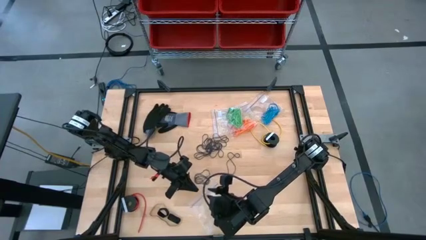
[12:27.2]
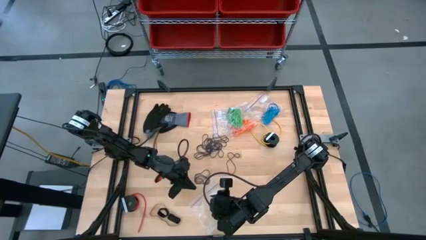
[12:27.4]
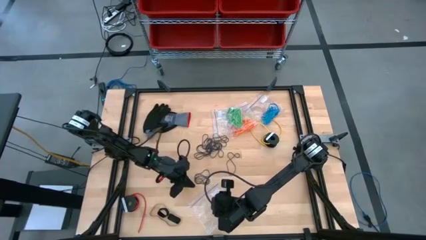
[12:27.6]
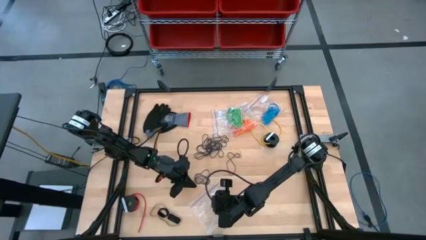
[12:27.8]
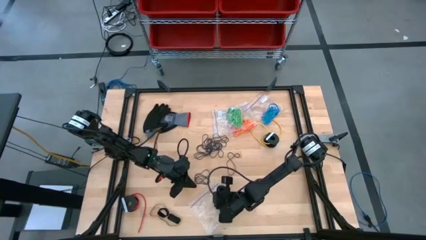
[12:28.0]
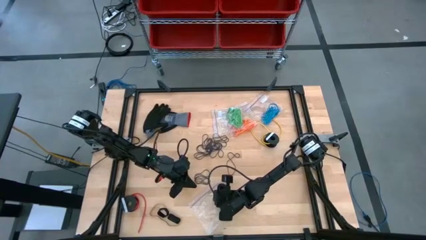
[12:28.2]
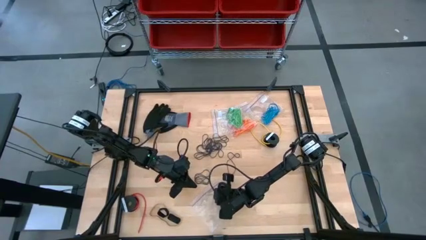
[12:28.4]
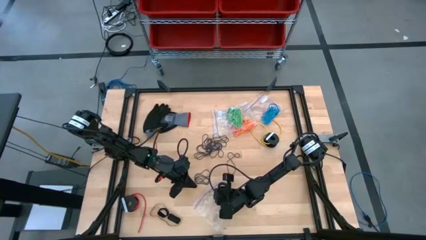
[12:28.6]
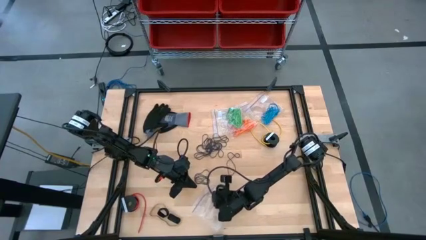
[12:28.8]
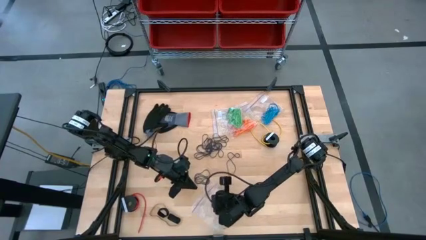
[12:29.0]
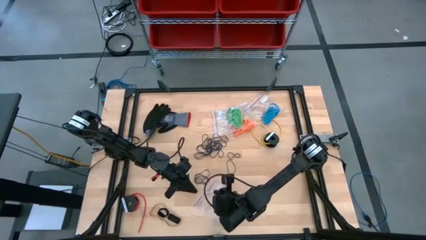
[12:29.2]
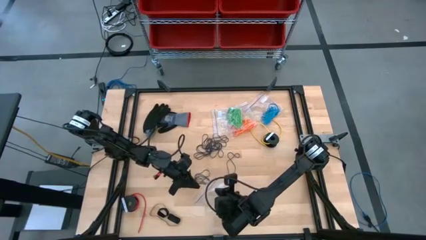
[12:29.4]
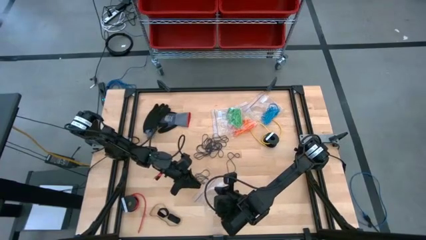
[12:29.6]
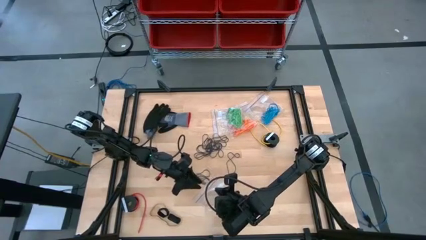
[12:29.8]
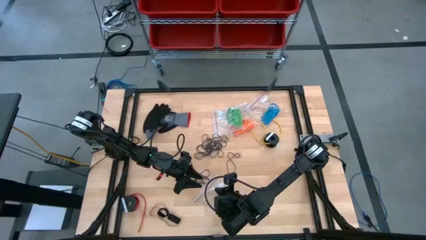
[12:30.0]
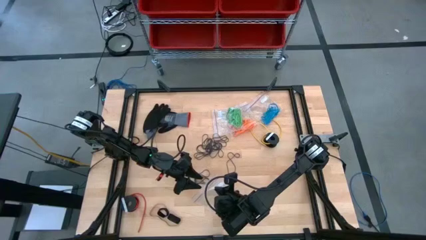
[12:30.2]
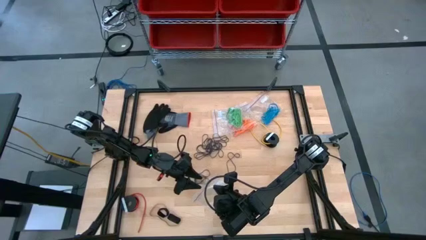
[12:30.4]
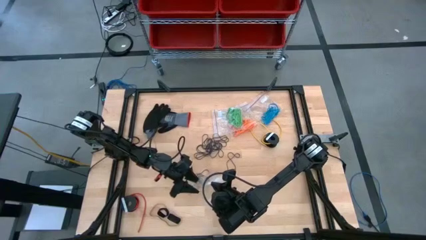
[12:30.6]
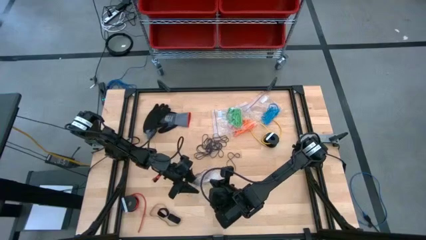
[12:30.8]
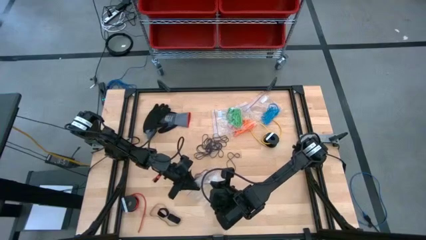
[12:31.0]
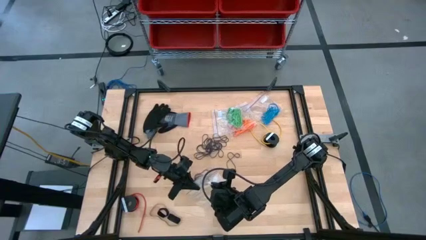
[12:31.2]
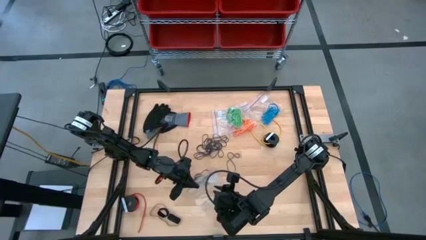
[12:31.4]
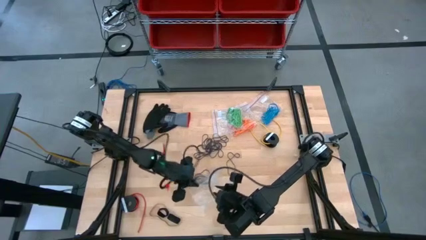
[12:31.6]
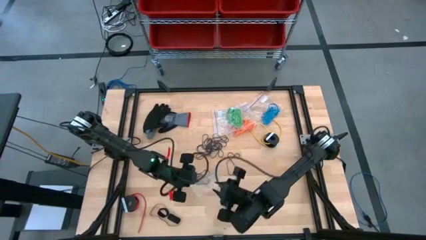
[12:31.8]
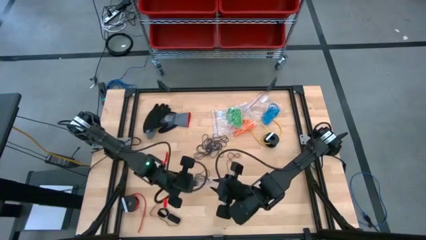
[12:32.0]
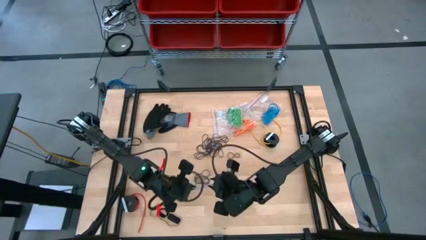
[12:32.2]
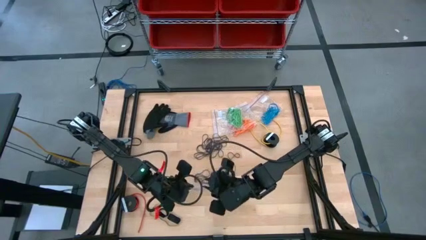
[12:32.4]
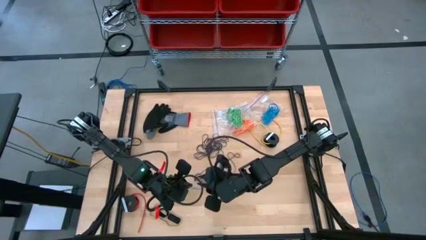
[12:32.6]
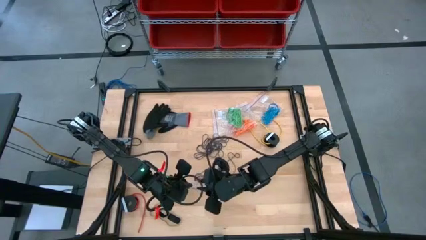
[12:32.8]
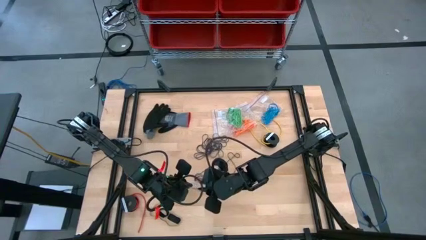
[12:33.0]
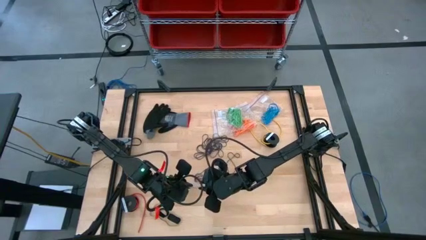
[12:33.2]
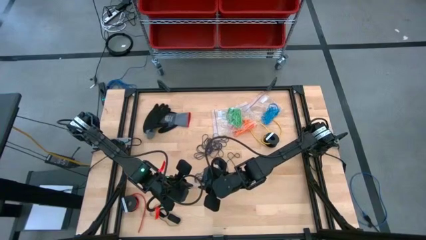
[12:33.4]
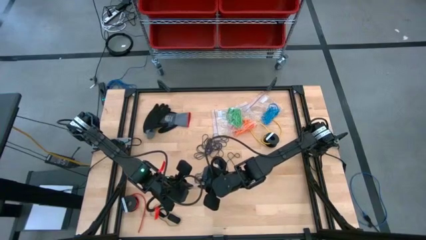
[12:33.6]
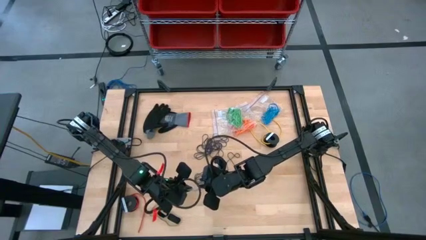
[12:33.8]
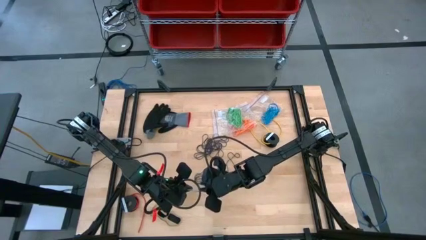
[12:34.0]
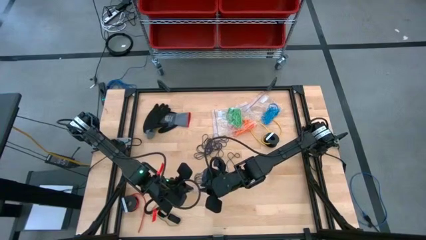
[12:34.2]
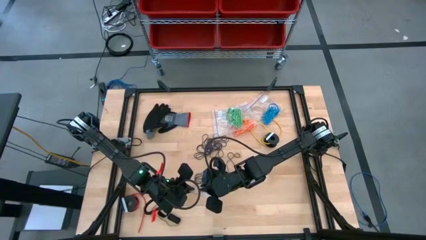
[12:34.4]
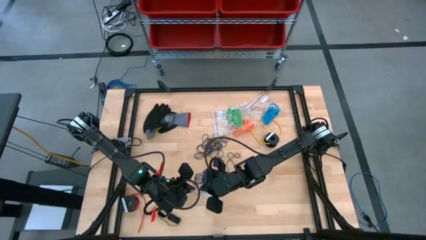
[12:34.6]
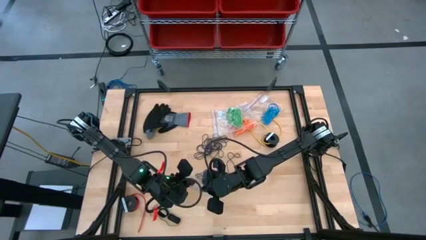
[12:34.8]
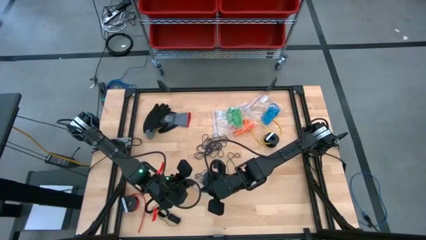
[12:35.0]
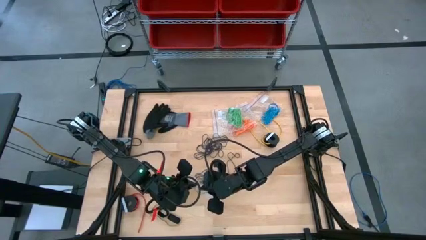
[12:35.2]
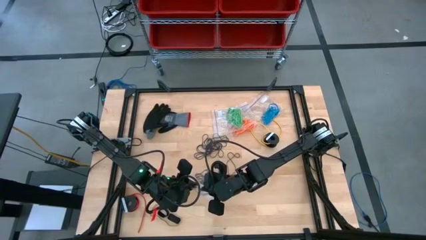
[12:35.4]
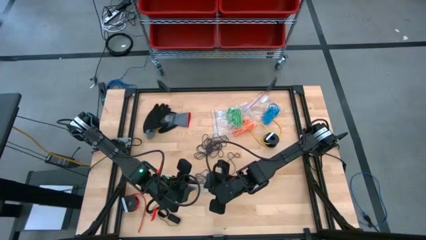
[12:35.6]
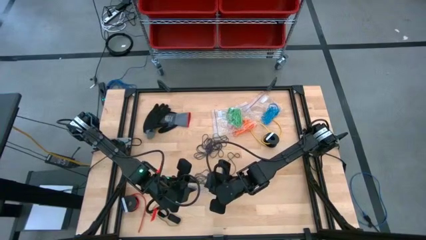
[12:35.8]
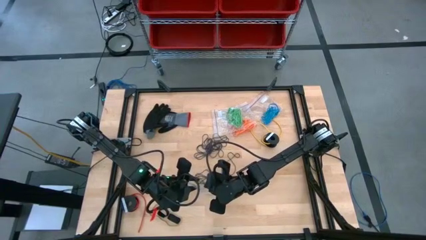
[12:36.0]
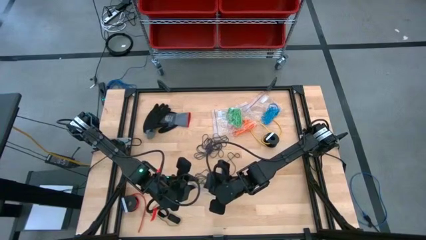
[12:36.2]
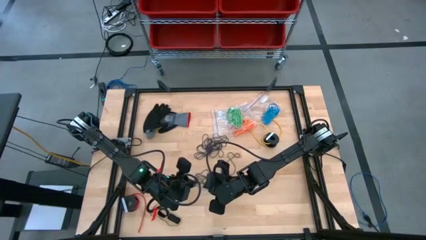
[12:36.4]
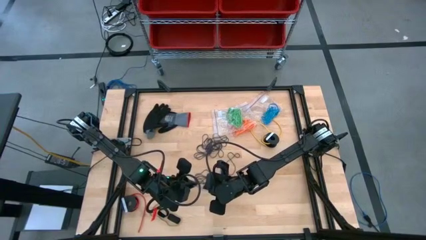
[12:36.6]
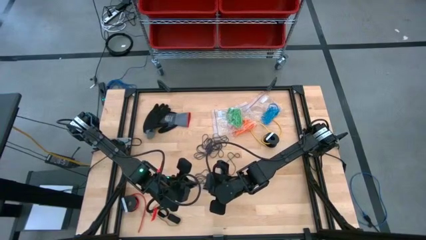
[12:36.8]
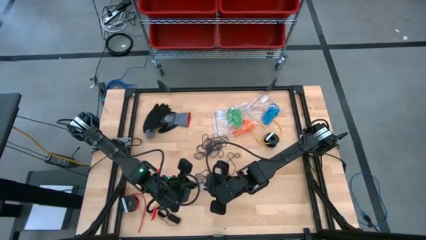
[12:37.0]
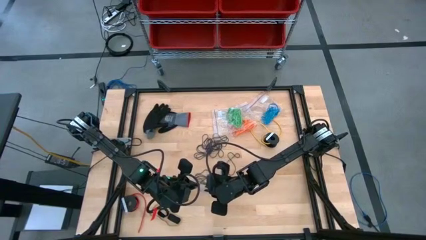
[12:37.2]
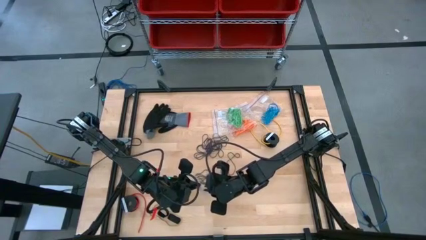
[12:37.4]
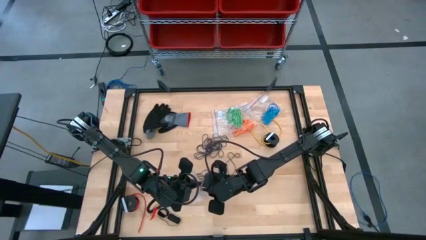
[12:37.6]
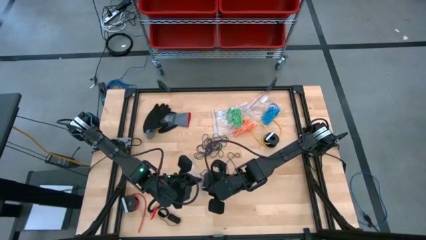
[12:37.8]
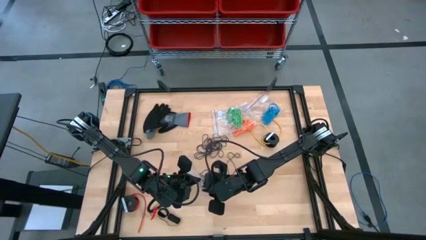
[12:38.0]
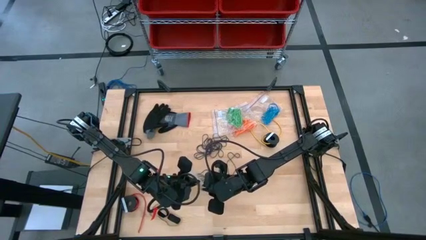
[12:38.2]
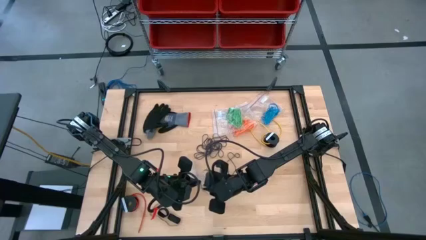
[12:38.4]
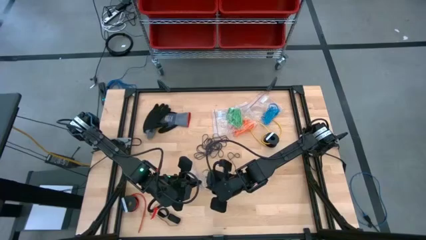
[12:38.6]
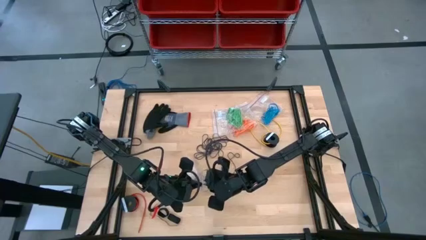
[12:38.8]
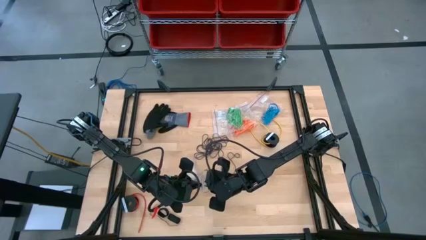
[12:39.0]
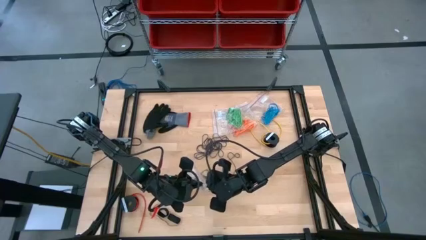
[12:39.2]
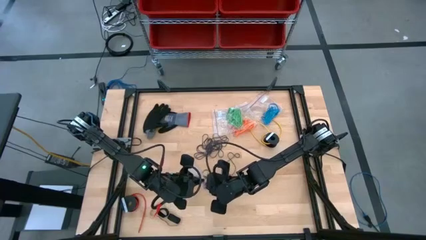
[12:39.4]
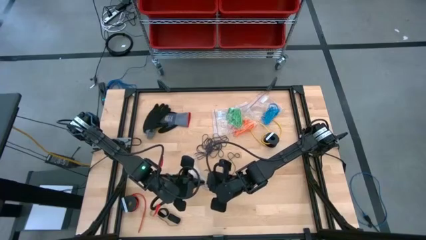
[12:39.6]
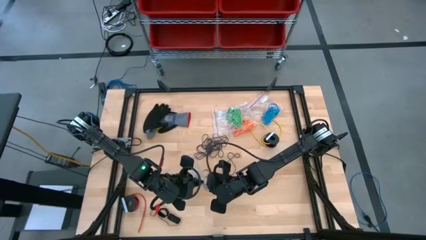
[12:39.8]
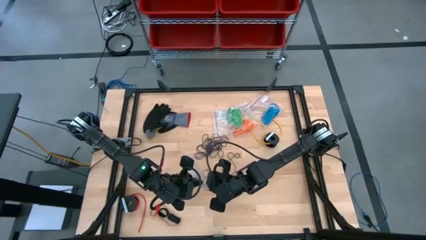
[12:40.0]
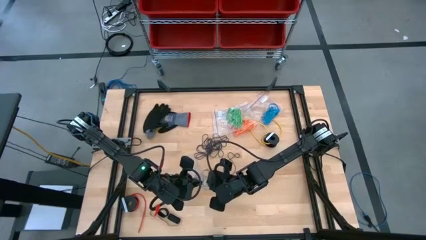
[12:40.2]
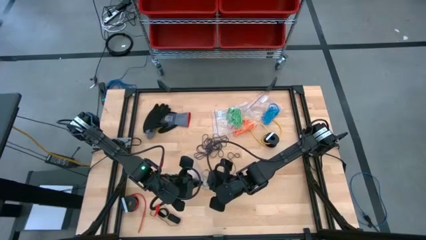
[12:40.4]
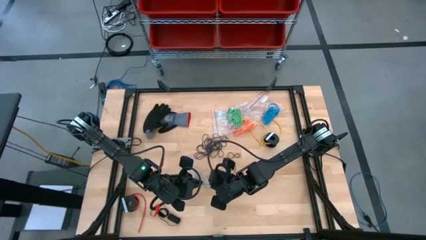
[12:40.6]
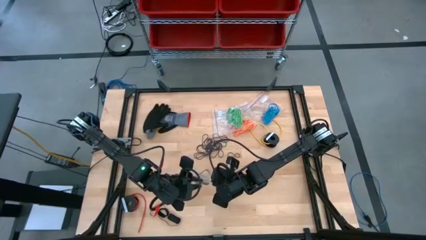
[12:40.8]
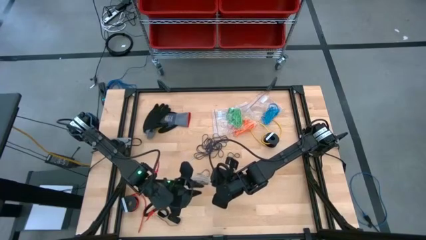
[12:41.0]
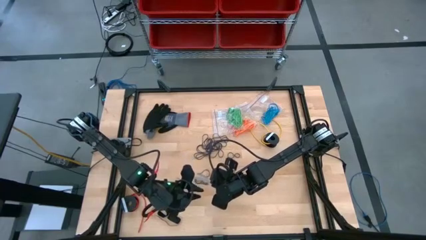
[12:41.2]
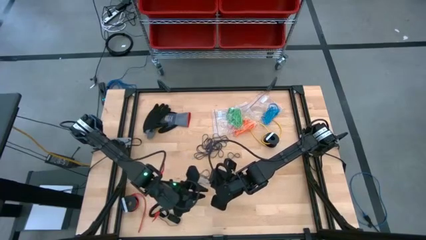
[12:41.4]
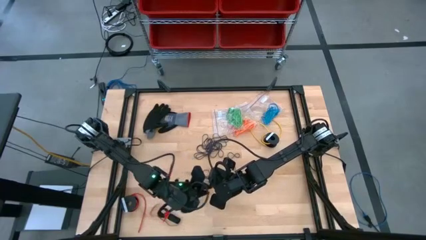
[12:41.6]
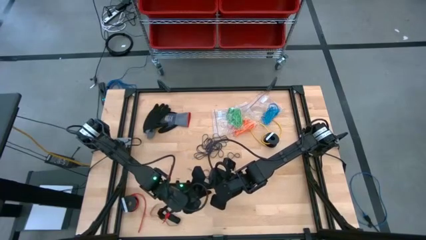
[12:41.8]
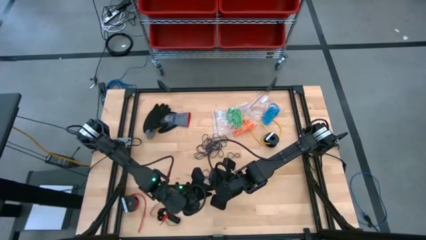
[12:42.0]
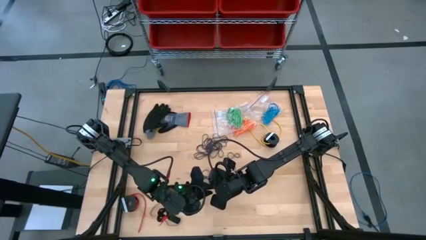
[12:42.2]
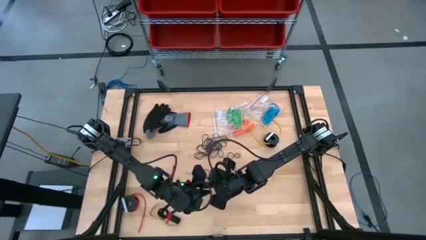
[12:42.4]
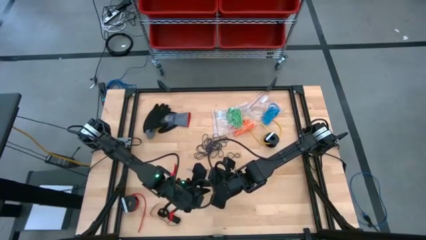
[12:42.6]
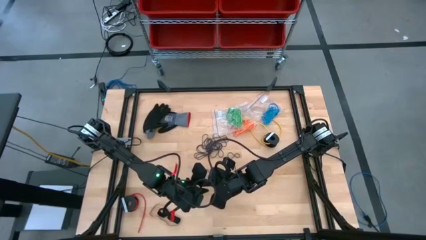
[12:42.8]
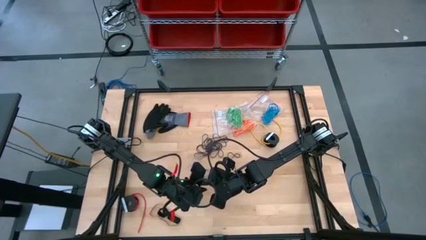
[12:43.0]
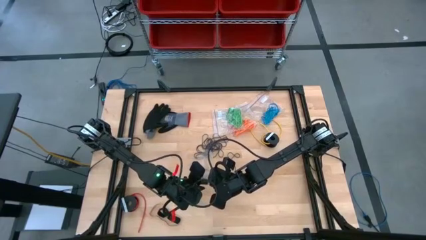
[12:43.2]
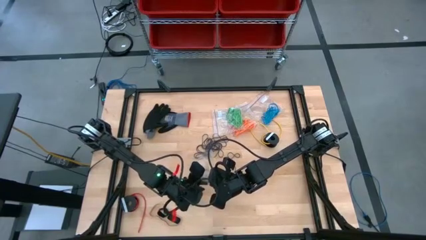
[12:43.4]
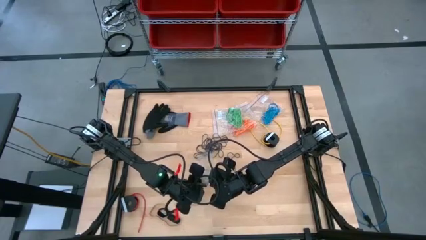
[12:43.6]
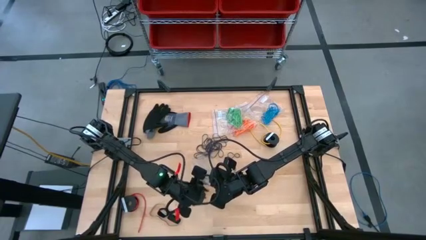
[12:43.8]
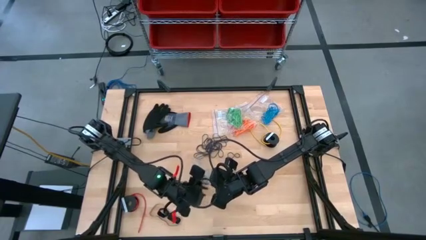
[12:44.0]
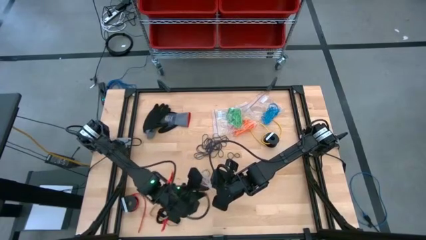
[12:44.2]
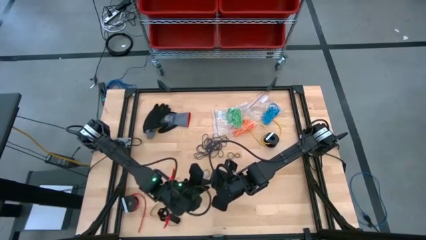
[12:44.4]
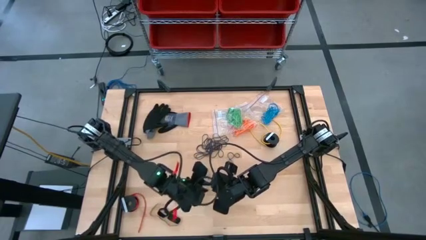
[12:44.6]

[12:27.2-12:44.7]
Task: Sort rubber bands
Open the transparent zip bag
